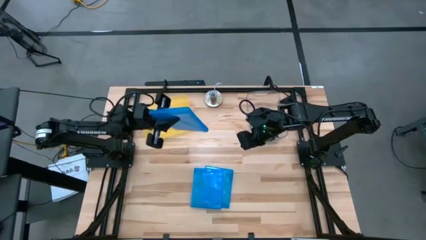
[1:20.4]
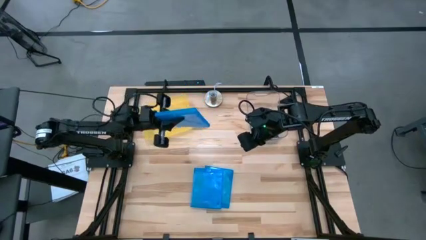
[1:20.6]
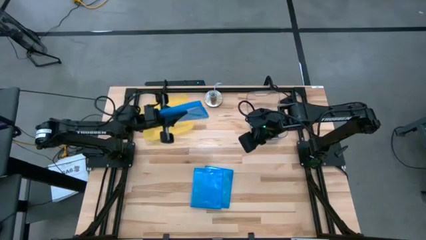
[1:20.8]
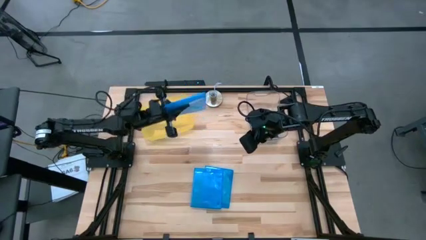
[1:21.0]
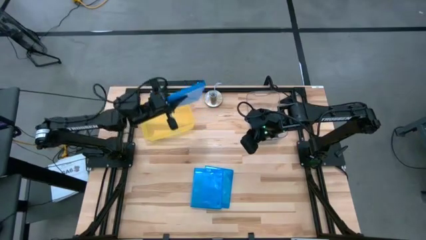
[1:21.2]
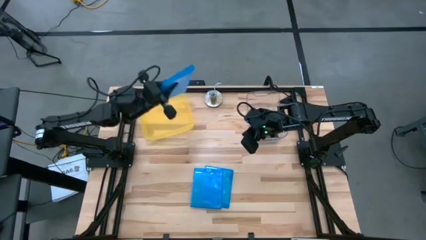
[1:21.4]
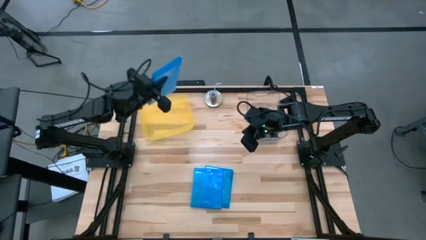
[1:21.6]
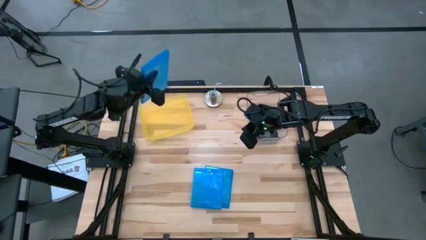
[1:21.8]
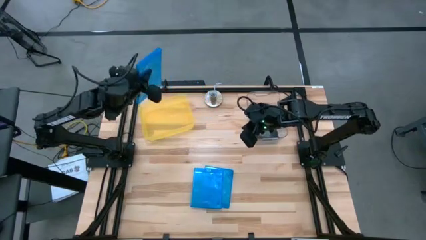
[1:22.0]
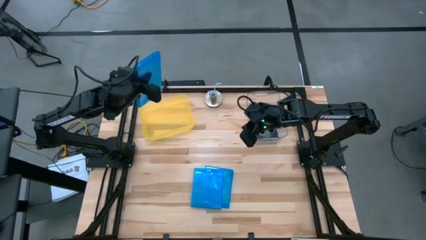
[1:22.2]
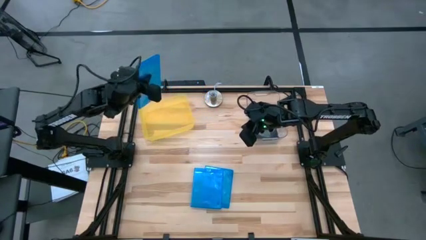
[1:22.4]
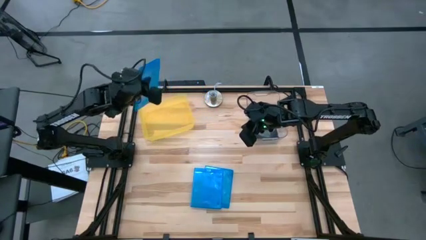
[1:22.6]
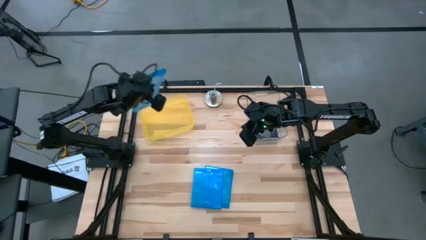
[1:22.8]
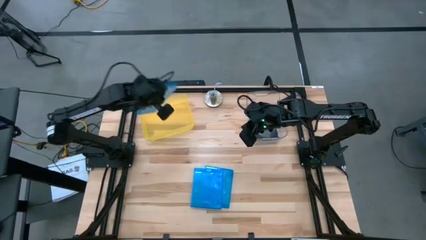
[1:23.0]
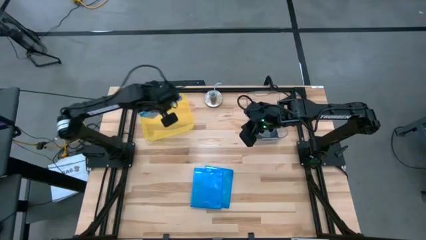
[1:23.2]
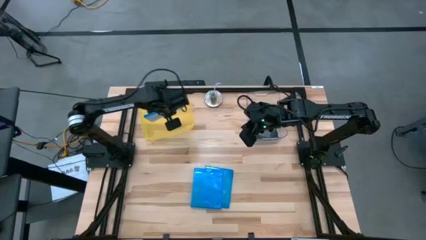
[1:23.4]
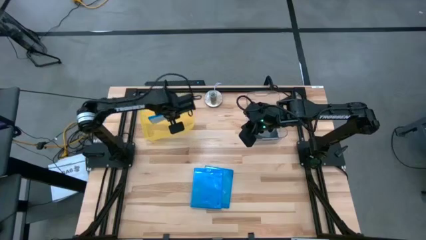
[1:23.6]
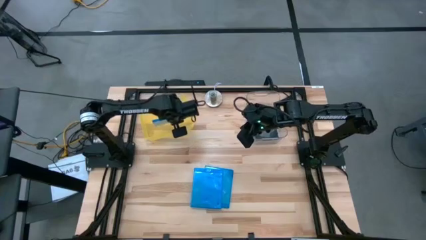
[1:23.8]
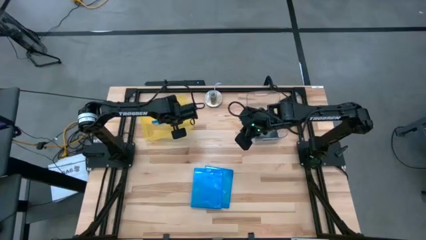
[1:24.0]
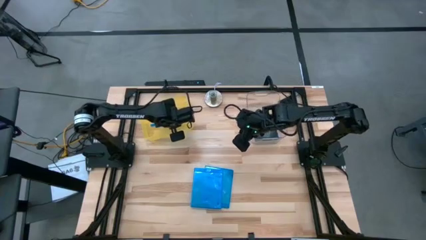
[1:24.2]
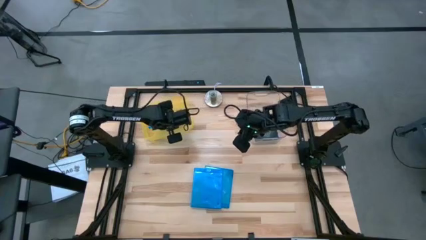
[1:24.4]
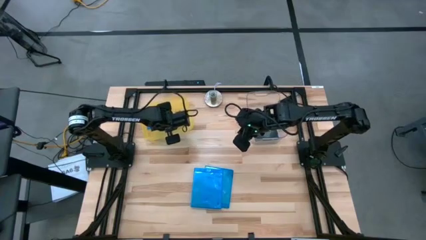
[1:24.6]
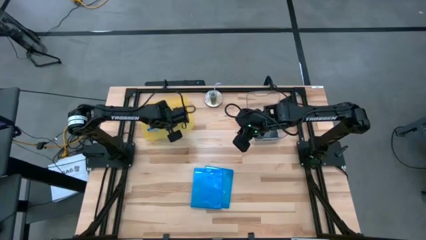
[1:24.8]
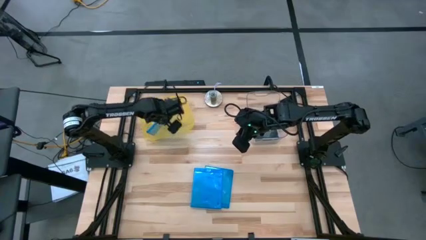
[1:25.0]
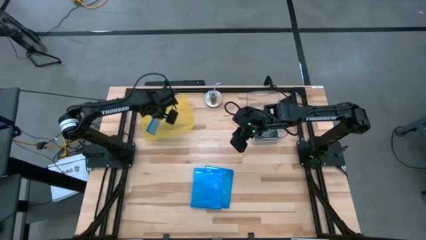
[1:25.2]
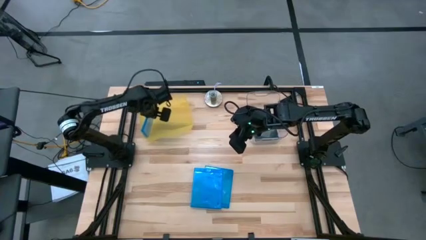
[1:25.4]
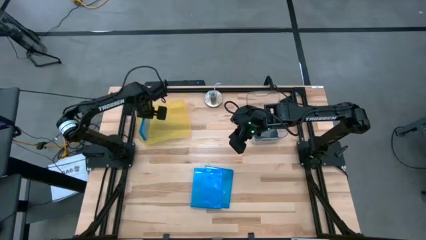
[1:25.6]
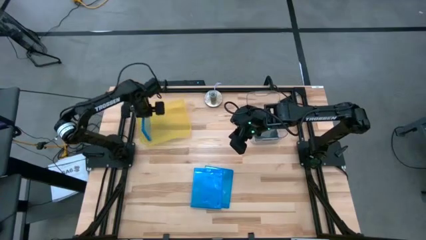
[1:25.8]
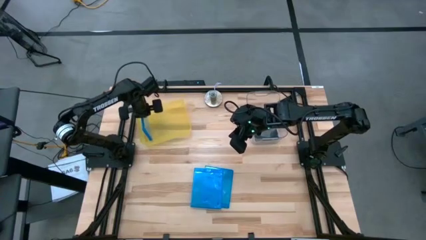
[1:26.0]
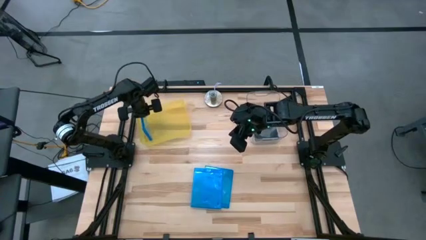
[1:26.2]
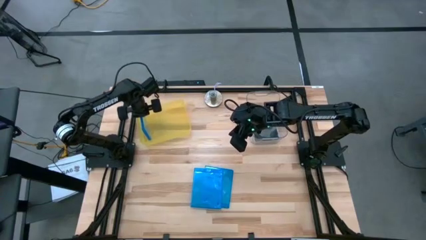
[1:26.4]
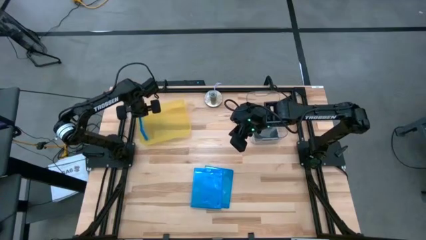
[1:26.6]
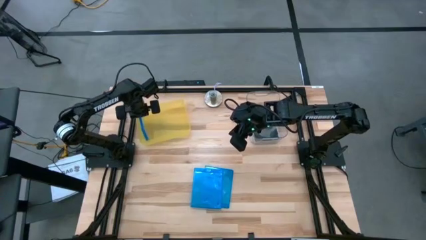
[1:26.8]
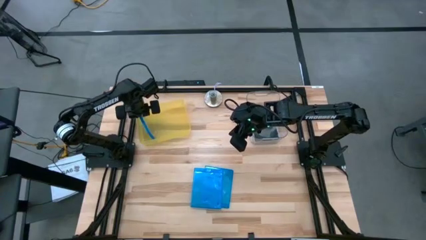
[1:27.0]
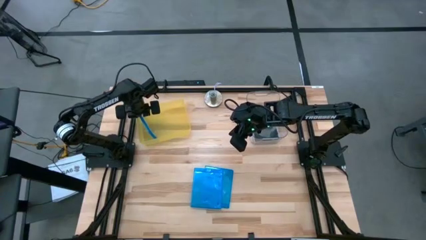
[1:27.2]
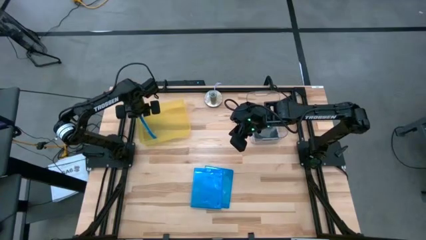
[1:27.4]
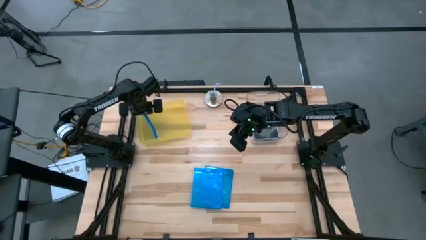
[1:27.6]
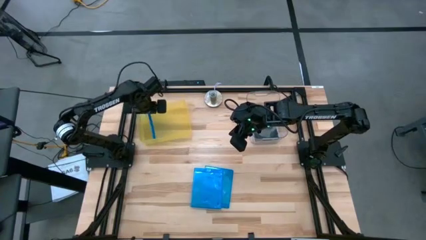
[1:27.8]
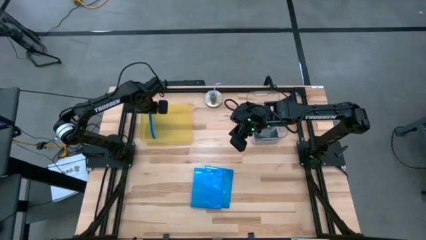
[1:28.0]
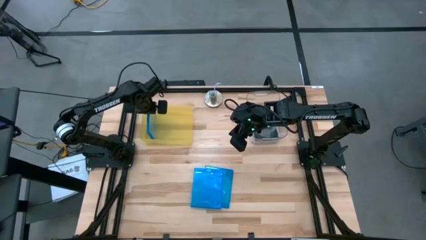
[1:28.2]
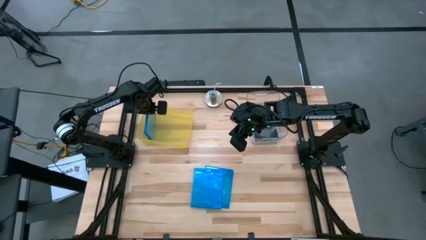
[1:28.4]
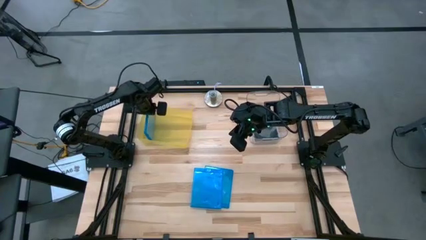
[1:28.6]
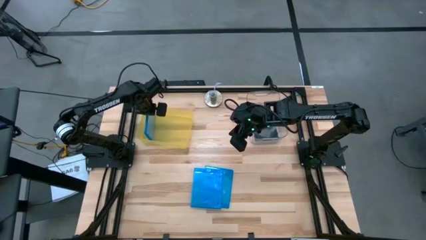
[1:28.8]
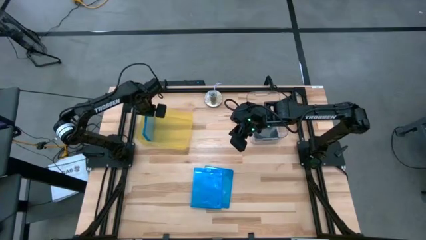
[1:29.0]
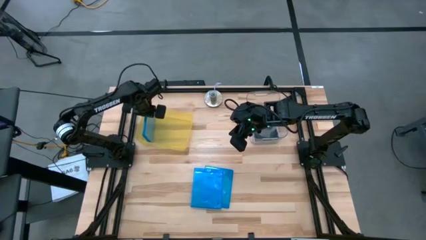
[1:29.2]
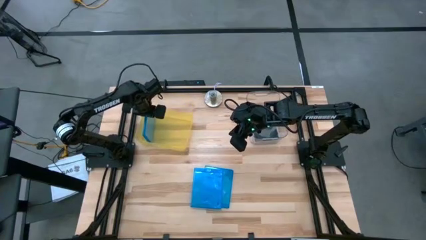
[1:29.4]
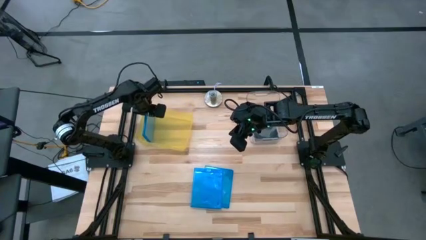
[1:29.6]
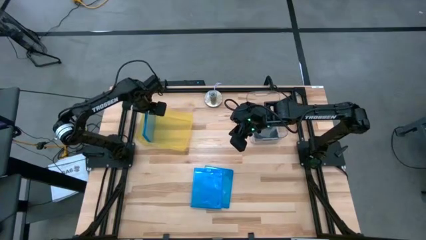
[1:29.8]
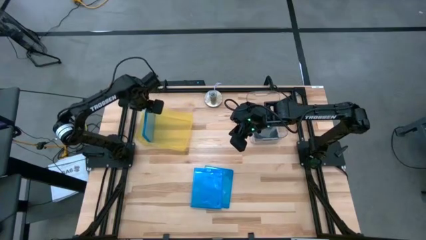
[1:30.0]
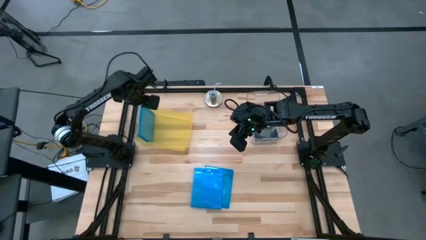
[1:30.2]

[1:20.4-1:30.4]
Task: Pick & place jewel cases by type
Put the blue CD case into the yellow bin

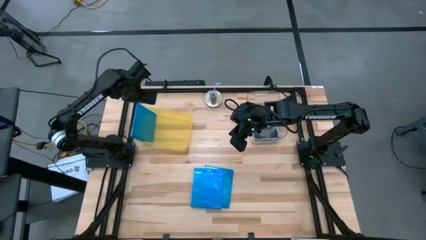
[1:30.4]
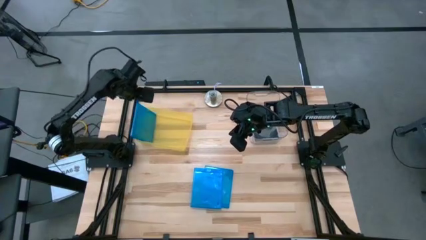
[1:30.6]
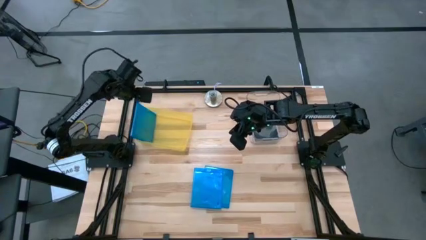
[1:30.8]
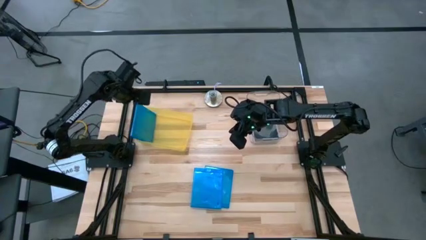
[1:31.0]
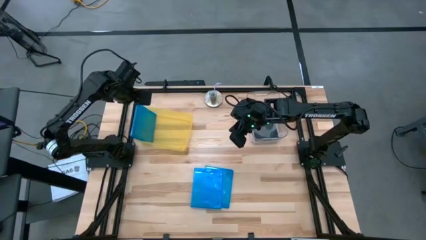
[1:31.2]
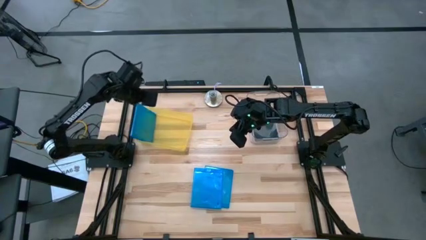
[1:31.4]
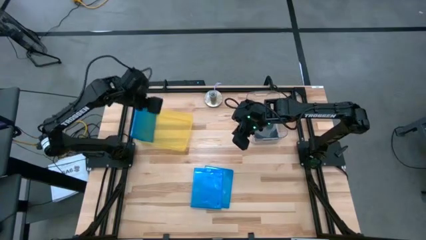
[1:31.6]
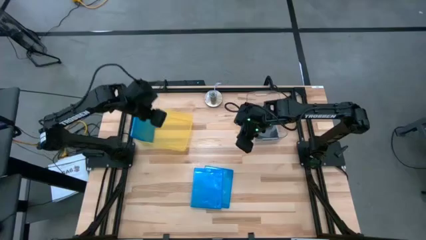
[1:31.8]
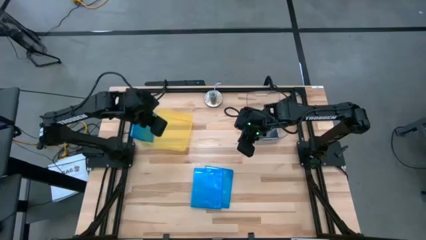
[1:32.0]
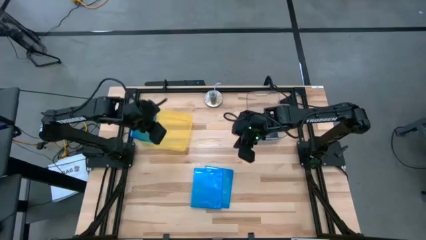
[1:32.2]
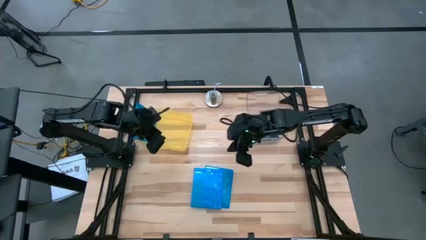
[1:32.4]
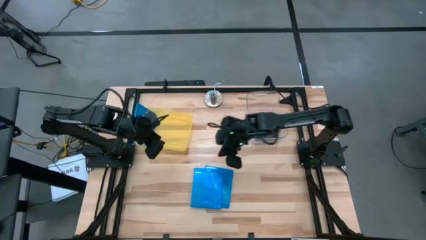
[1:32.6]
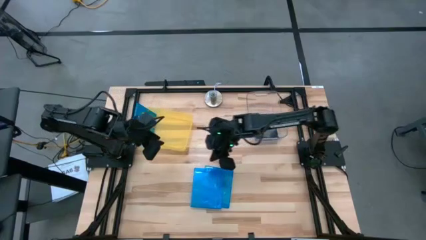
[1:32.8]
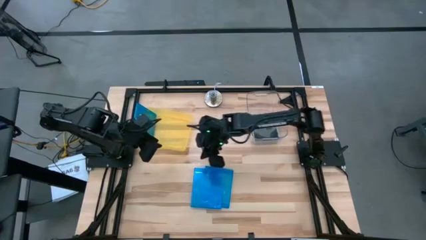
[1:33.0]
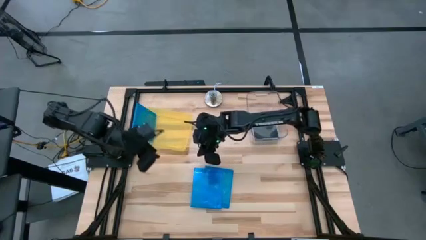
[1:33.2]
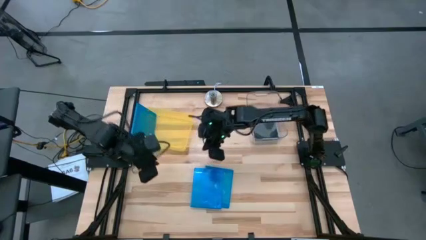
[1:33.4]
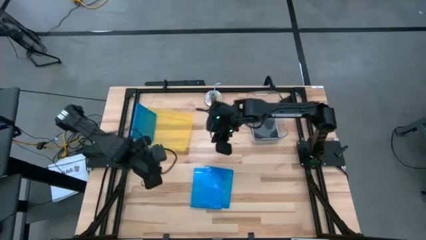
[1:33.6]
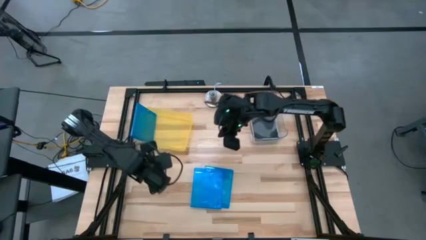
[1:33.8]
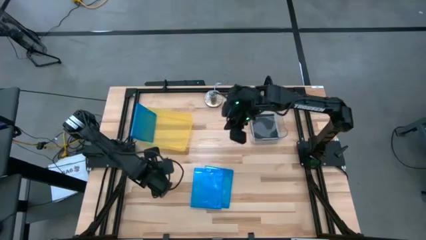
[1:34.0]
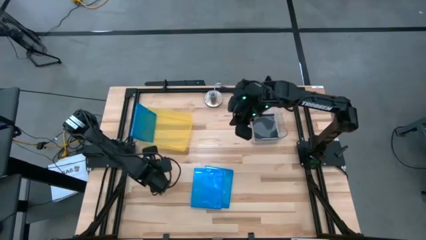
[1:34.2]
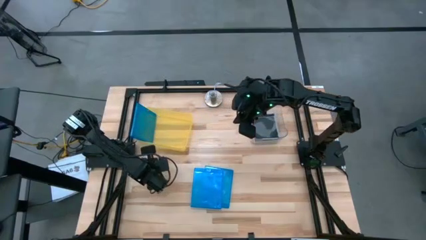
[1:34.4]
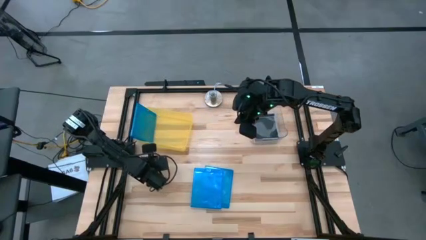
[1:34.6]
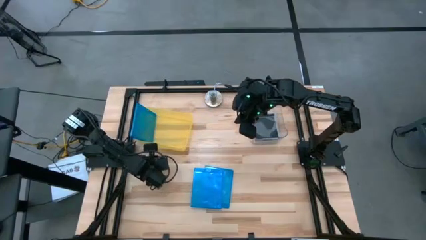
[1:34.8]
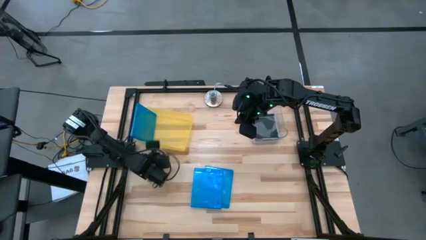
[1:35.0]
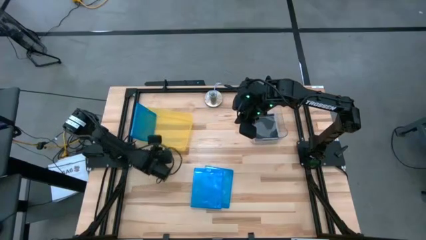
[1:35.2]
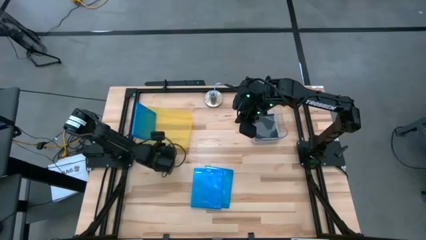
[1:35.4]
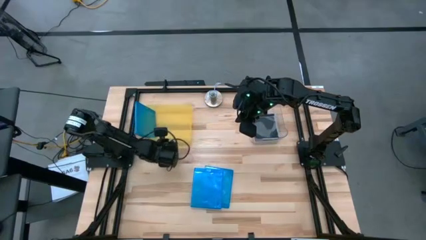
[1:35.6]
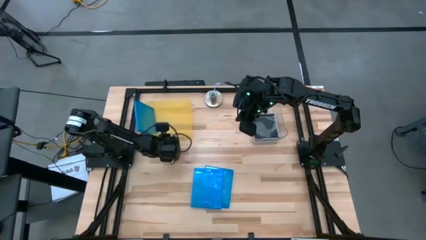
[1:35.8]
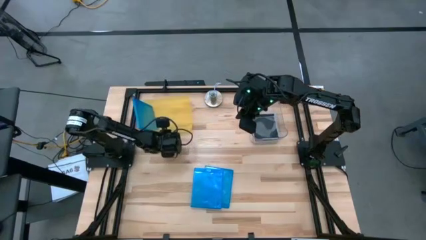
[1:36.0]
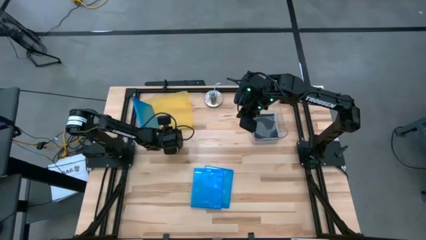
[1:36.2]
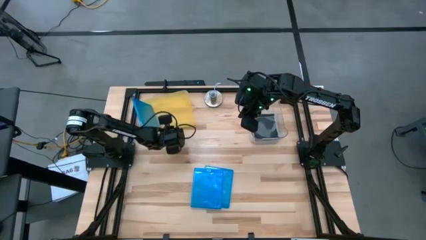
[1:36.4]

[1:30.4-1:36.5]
Adjust the yellow bin on the table
